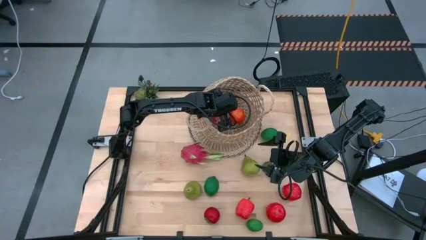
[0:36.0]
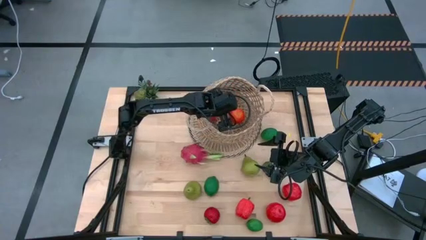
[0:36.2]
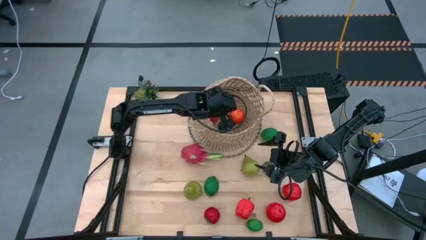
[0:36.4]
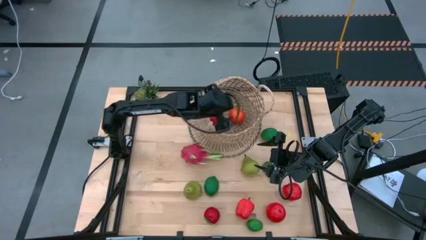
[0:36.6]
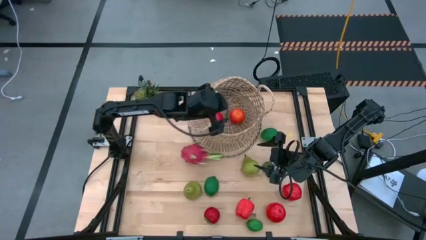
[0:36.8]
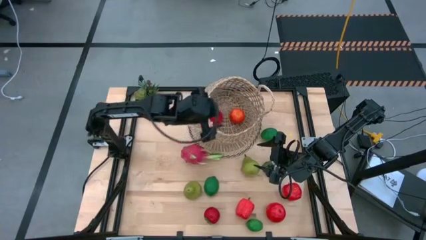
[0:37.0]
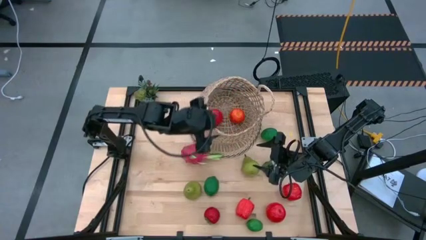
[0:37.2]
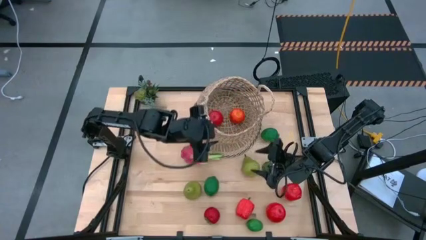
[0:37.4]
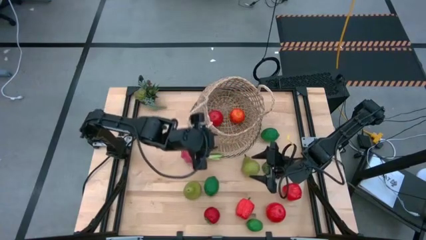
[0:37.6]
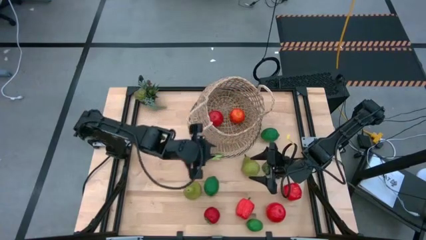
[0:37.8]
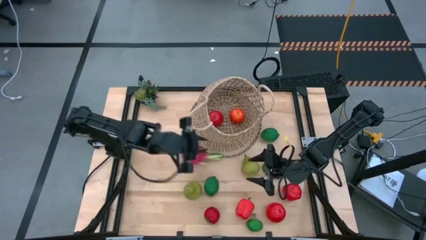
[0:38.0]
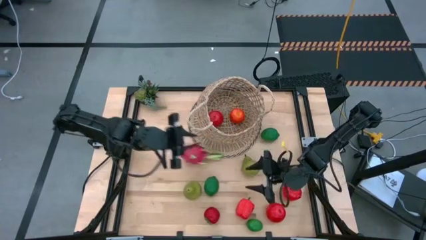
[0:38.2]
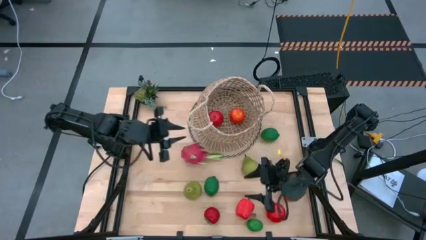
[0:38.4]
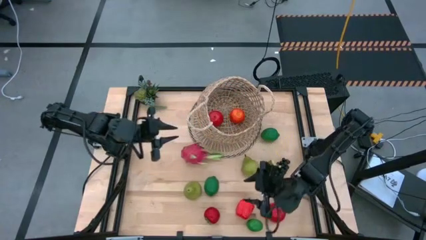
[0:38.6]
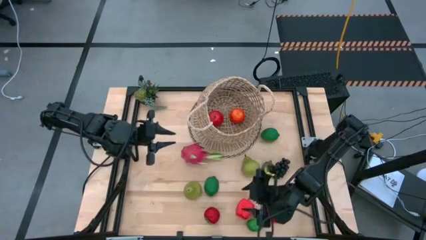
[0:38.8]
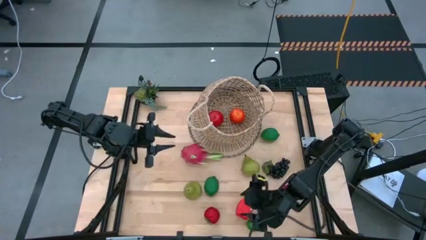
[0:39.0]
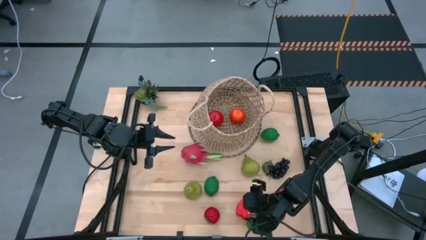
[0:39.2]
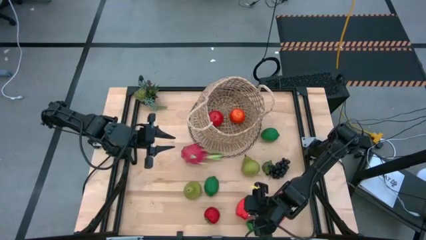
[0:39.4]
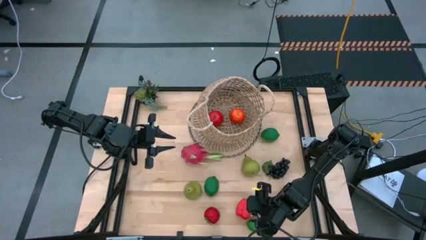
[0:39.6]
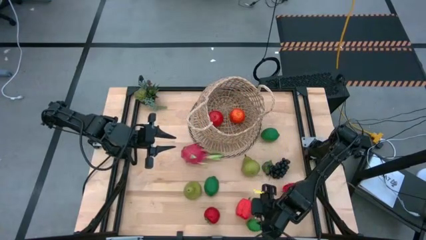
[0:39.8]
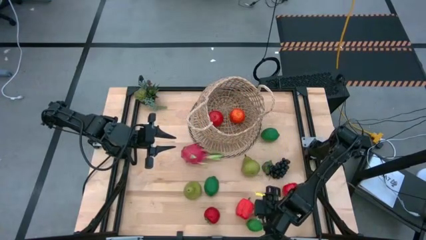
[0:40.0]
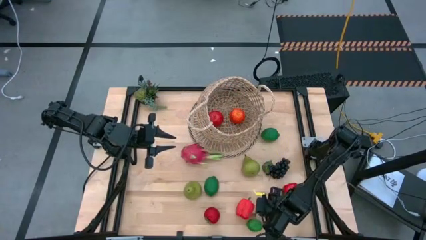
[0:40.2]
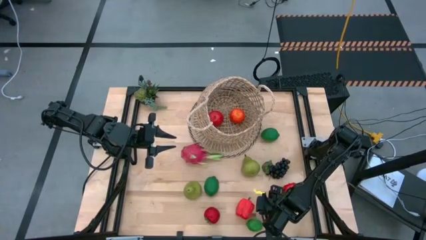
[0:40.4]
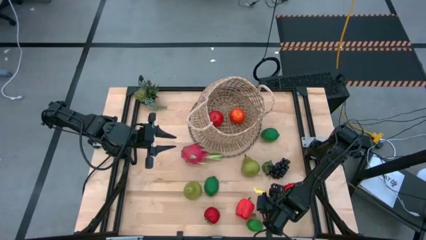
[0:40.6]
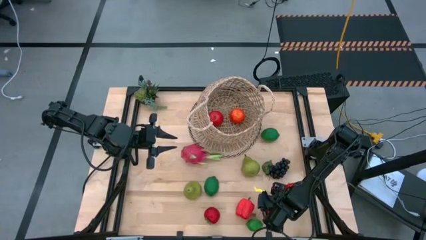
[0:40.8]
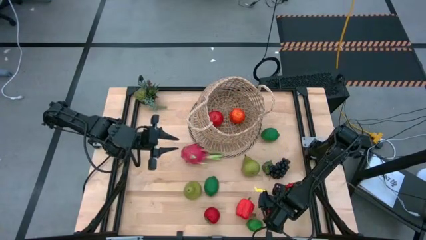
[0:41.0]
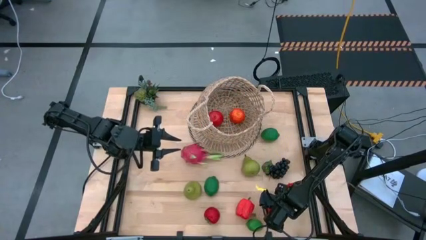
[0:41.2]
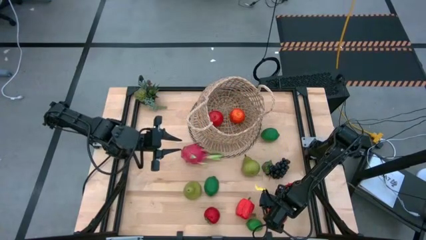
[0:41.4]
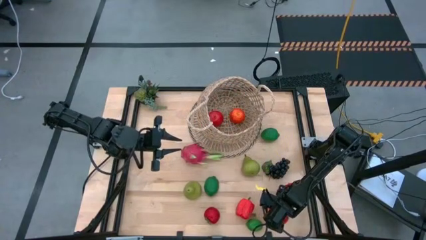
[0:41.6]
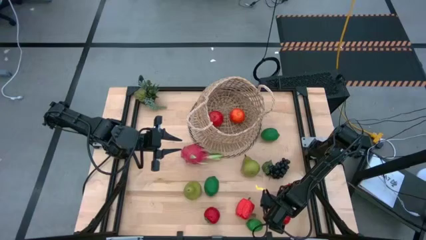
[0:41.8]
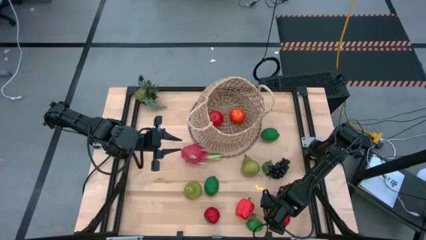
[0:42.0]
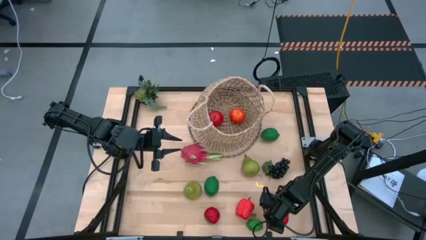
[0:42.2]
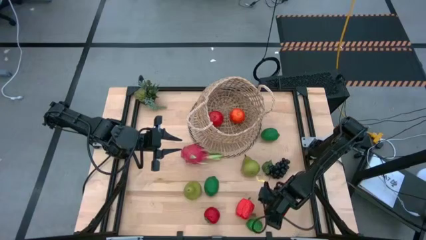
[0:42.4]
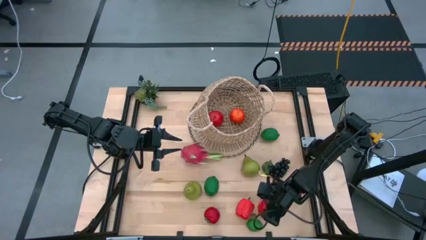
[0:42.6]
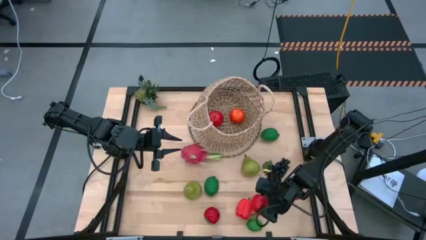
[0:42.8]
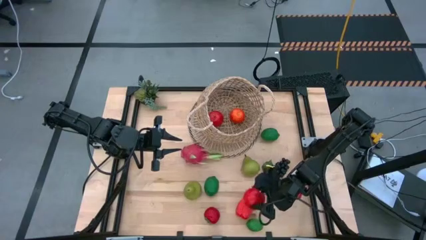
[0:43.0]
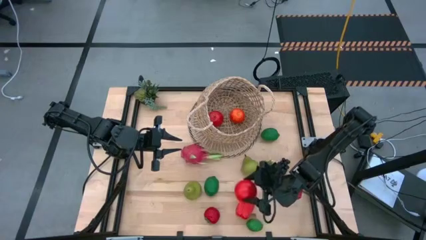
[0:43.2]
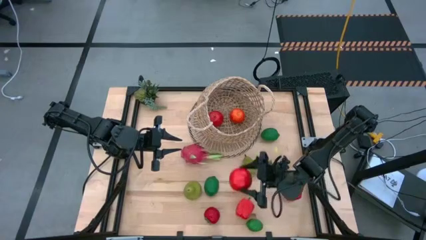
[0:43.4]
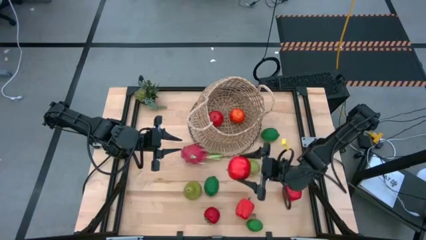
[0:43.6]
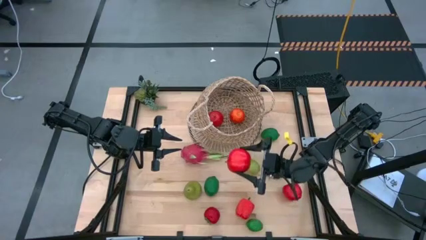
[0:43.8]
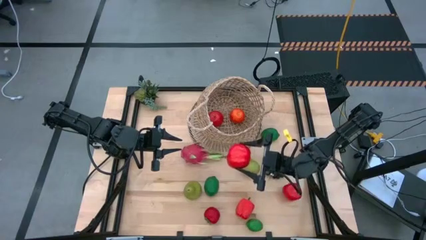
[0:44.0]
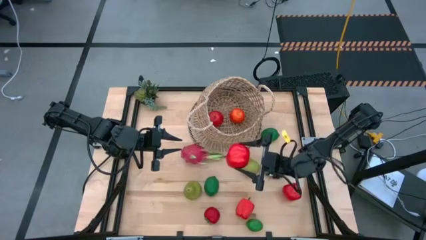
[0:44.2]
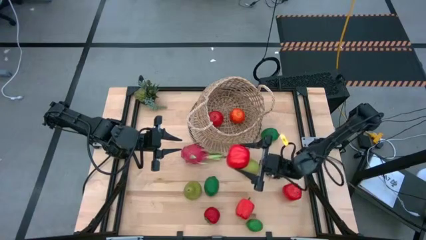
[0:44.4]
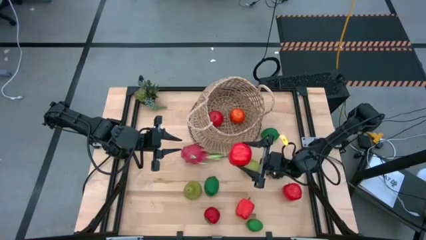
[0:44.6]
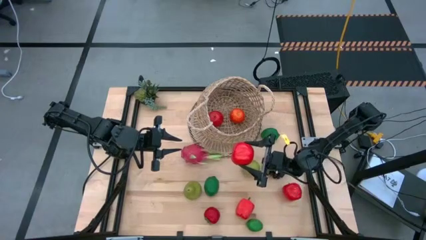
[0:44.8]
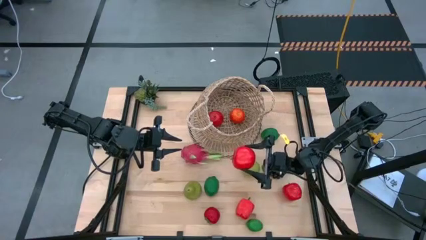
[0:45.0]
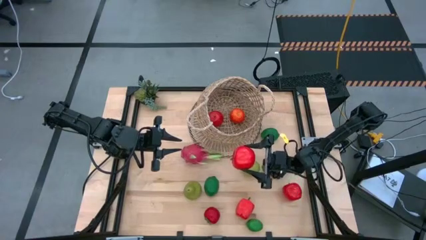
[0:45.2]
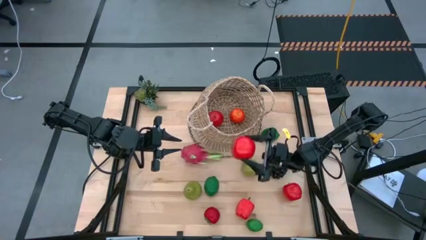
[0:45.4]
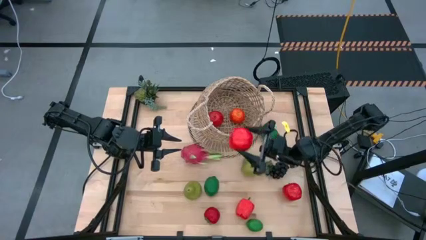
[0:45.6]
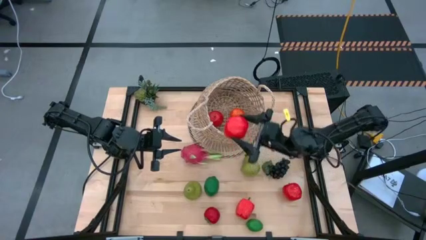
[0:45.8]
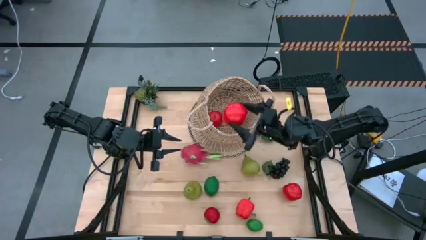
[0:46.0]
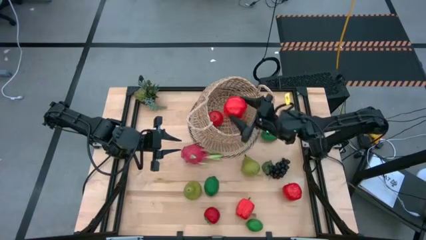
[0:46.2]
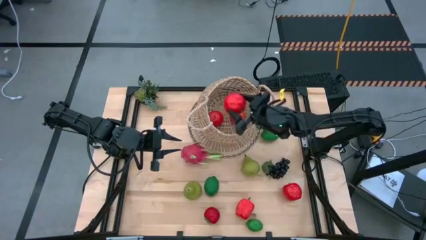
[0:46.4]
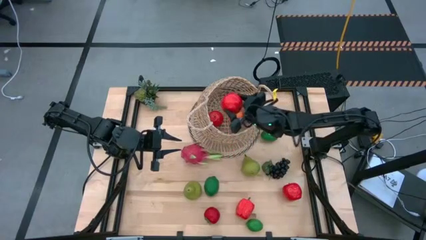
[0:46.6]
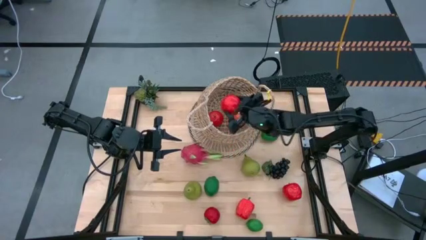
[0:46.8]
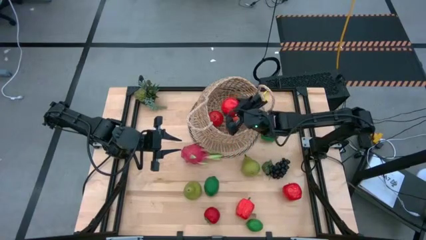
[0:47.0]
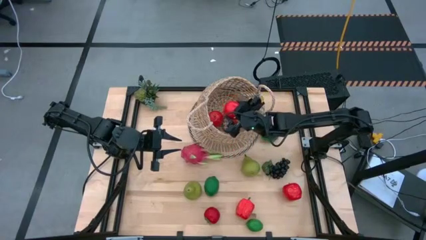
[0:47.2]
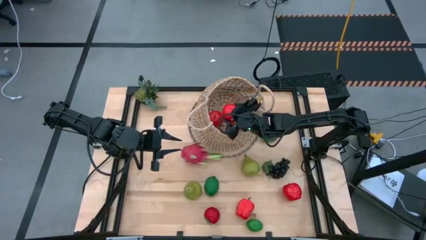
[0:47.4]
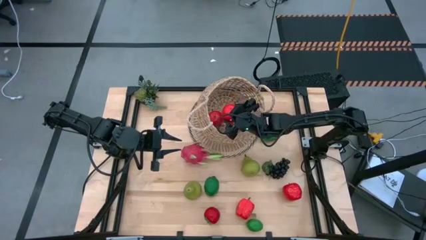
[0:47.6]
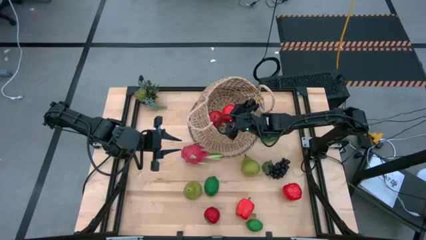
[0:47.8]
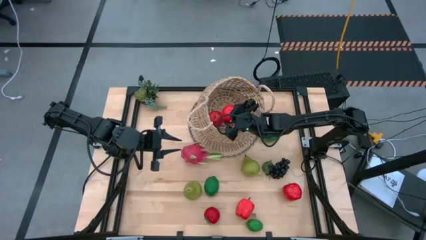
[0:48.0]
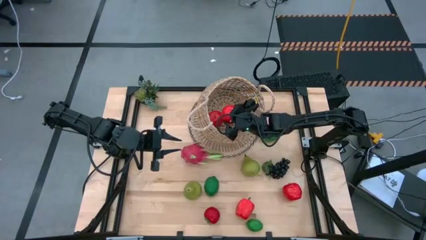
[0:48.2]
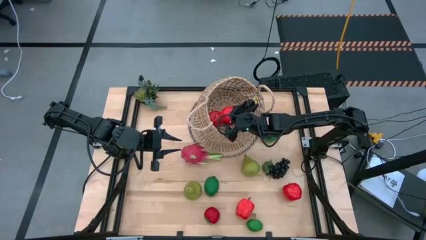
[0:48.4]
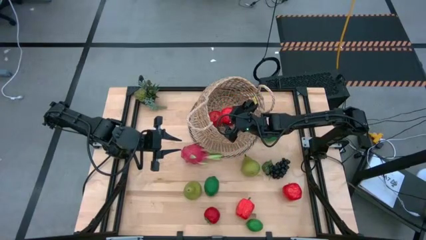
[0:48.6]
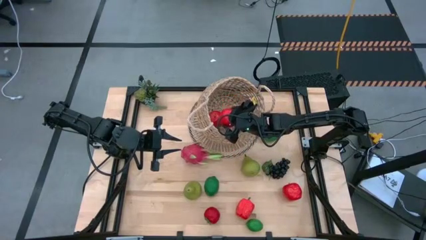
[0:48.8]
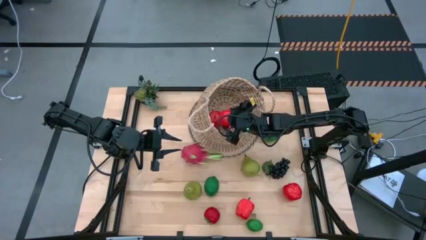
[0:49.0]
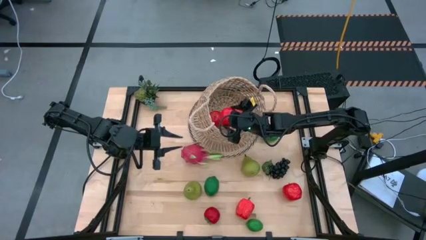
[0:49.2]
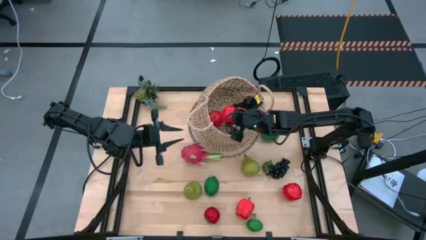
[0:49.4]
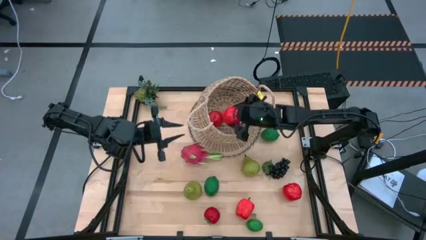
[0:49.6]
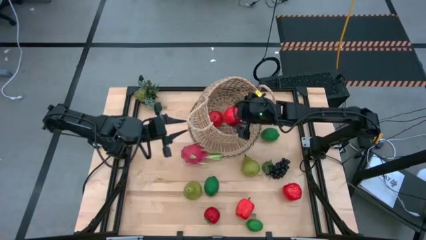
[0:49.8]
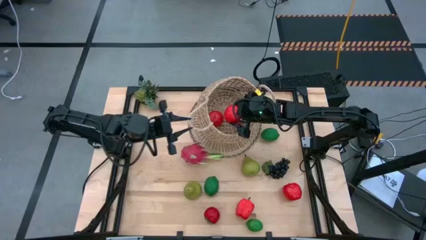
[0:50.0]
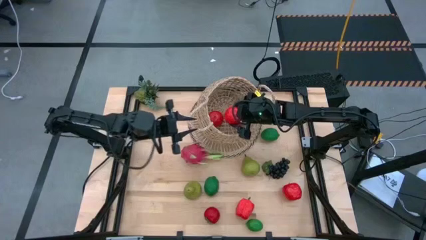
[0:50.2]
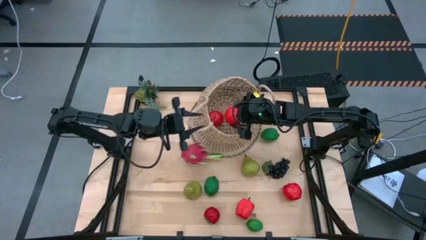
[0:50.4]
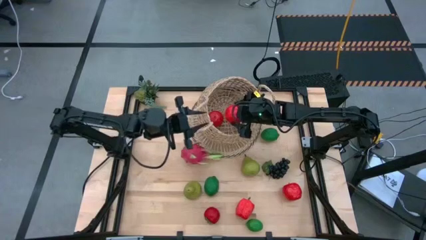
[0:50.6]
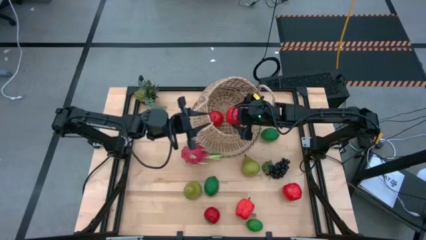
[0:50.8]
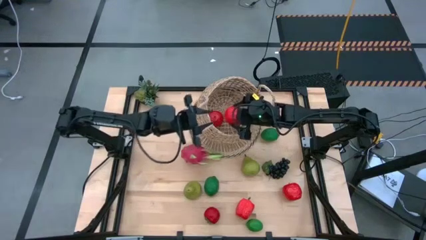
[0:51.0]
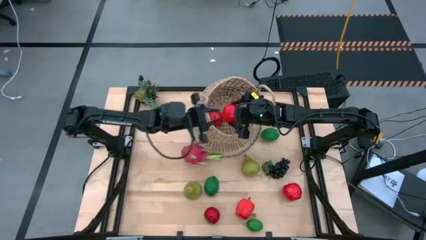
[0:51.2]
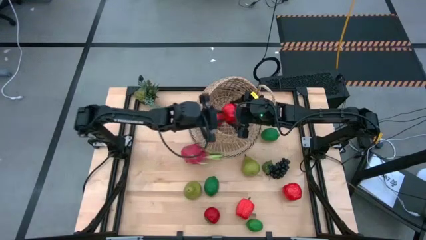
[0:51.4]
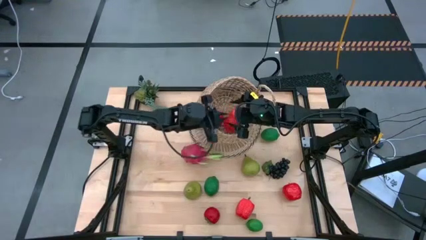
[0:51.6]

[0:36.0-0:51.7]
Task: Build produce basket
Put the red apple into the basket
